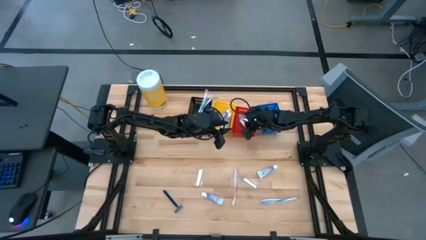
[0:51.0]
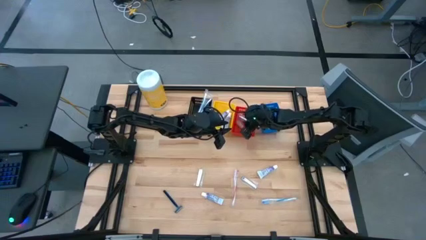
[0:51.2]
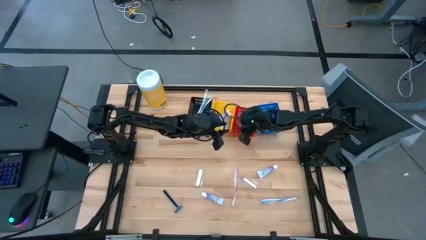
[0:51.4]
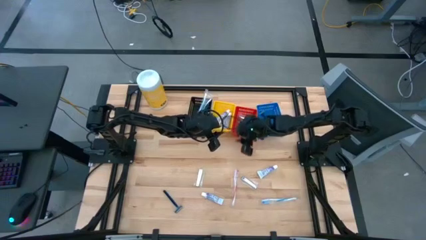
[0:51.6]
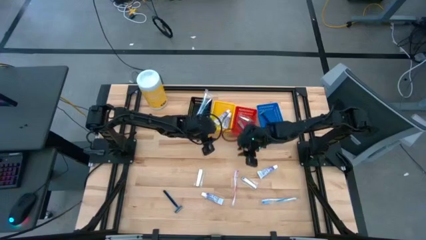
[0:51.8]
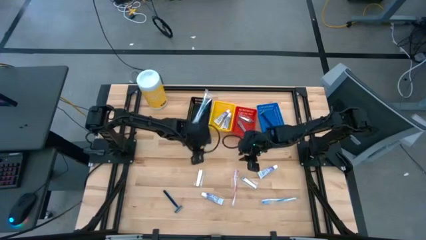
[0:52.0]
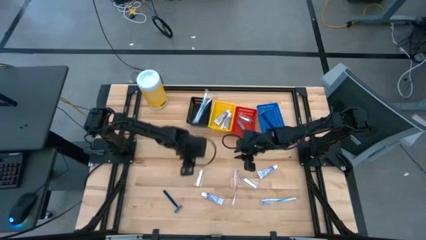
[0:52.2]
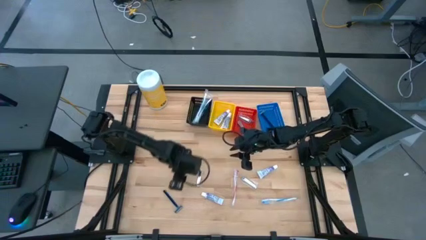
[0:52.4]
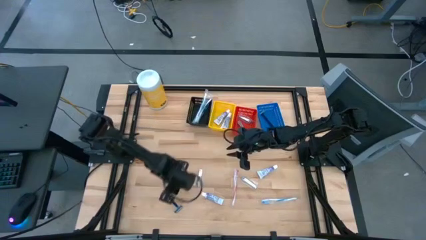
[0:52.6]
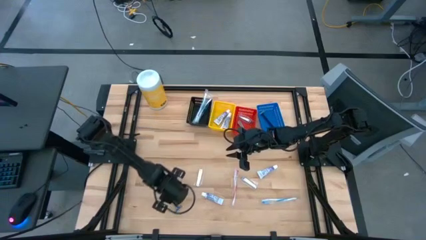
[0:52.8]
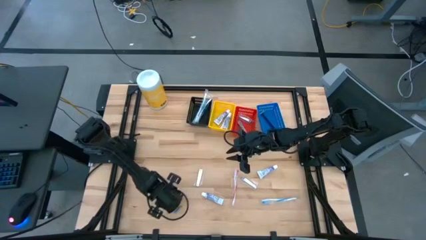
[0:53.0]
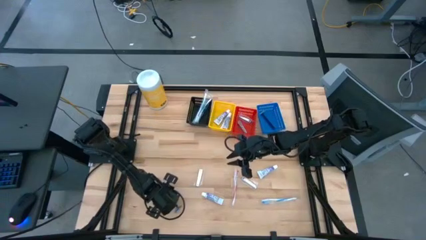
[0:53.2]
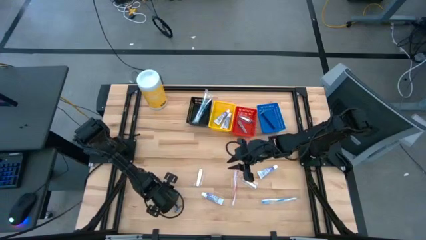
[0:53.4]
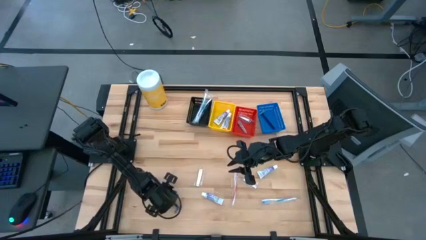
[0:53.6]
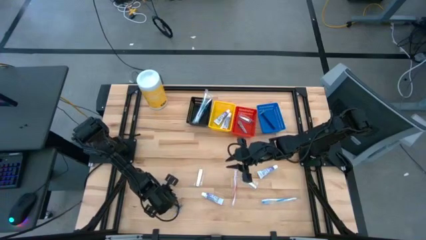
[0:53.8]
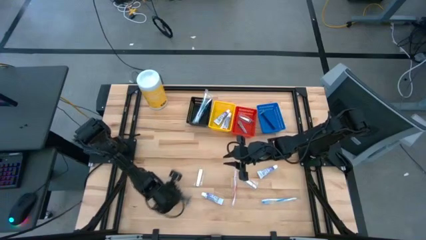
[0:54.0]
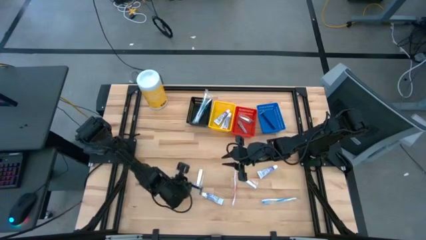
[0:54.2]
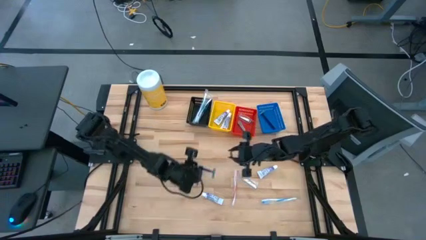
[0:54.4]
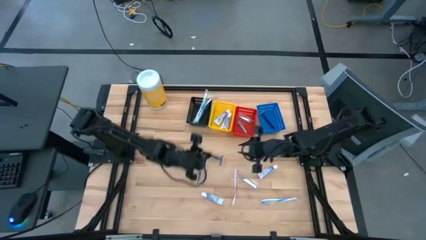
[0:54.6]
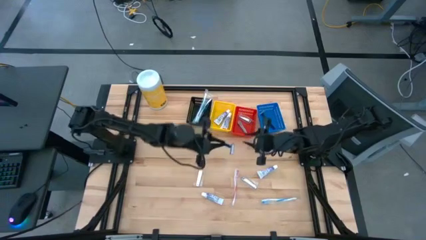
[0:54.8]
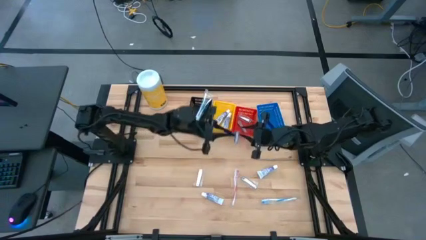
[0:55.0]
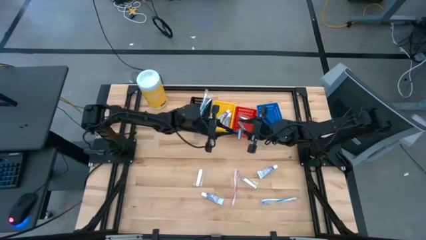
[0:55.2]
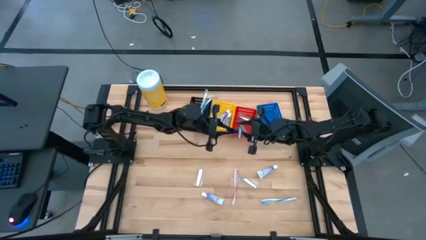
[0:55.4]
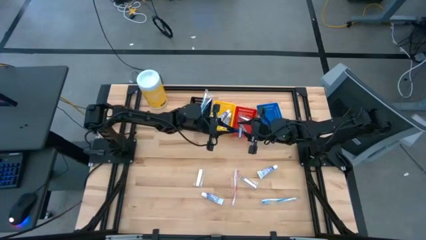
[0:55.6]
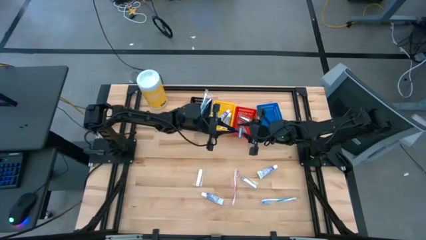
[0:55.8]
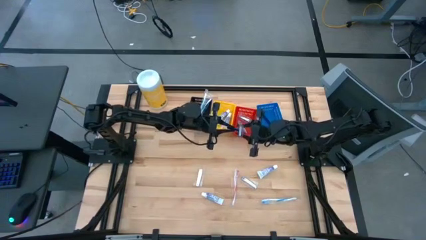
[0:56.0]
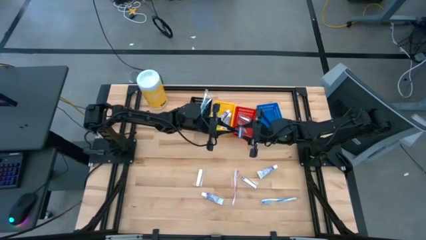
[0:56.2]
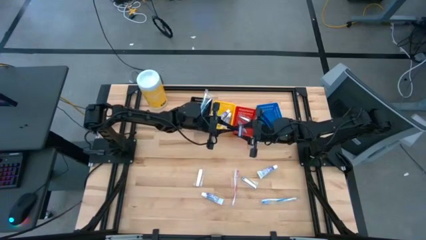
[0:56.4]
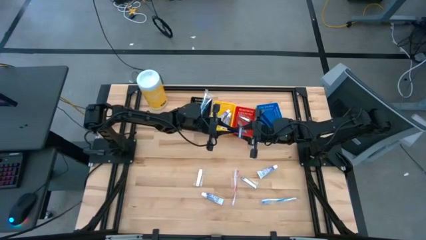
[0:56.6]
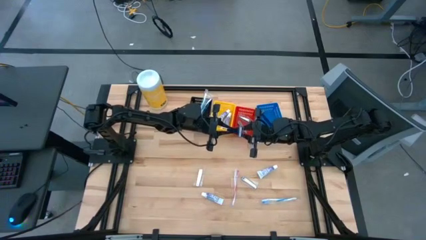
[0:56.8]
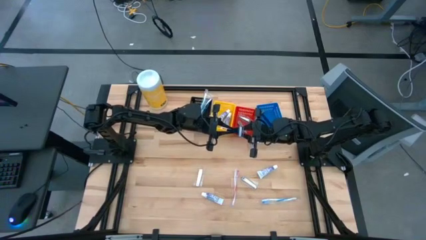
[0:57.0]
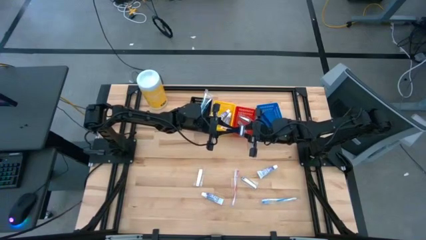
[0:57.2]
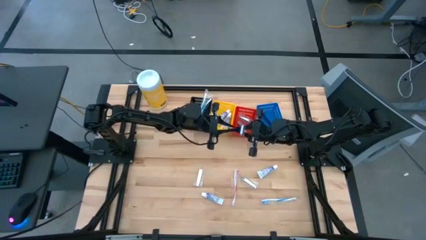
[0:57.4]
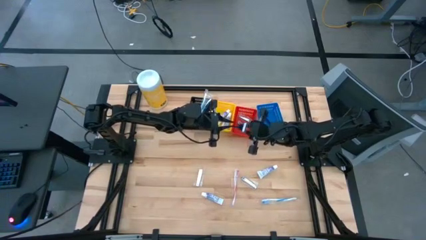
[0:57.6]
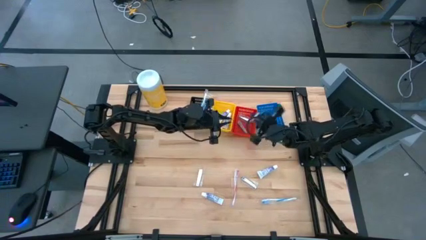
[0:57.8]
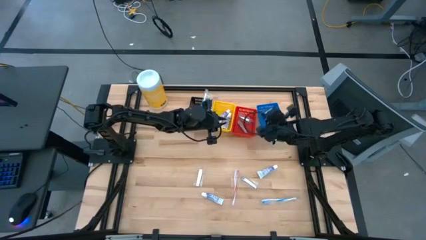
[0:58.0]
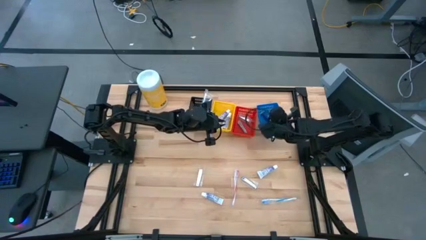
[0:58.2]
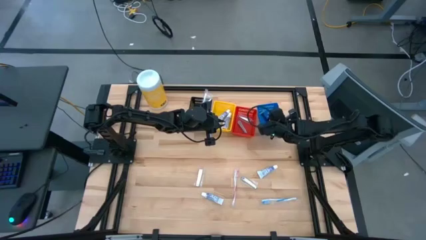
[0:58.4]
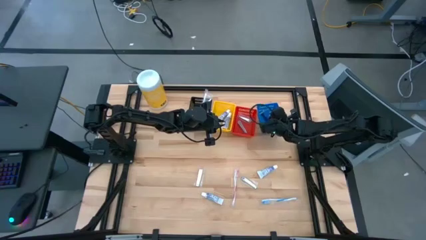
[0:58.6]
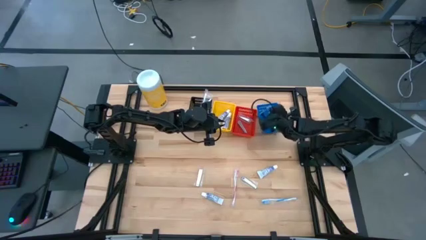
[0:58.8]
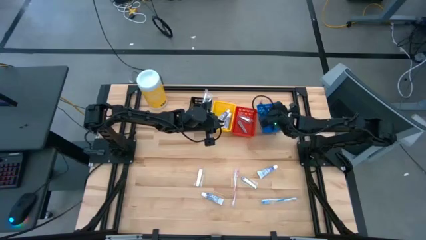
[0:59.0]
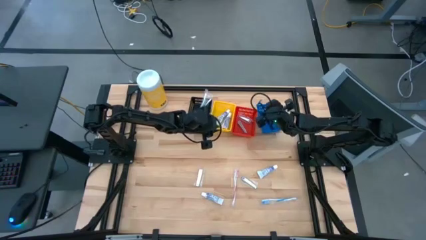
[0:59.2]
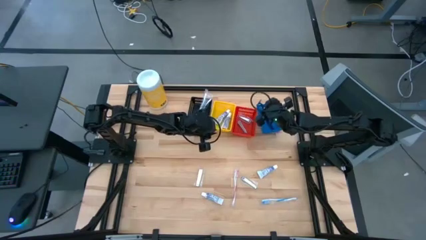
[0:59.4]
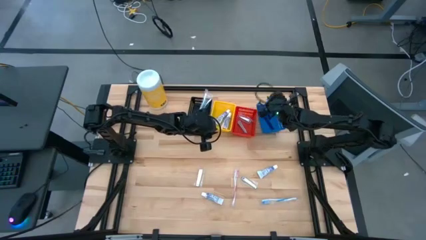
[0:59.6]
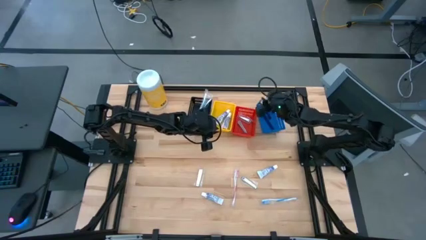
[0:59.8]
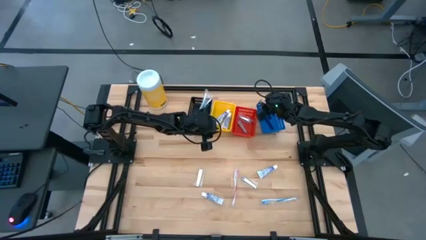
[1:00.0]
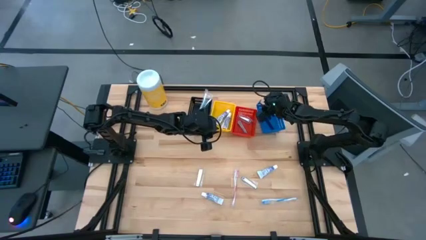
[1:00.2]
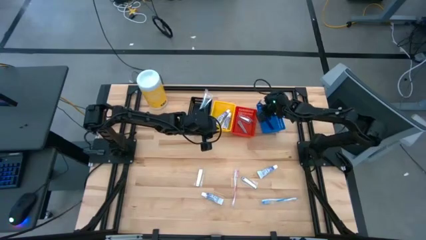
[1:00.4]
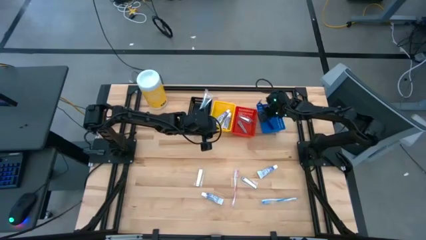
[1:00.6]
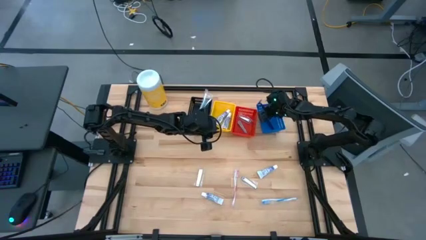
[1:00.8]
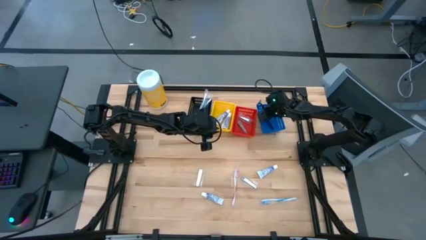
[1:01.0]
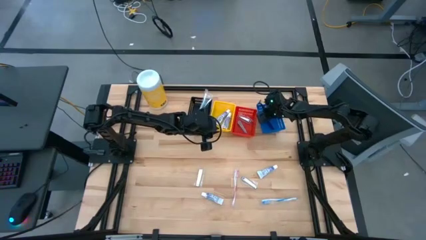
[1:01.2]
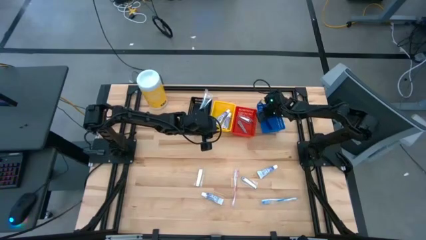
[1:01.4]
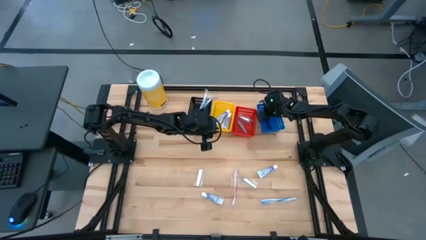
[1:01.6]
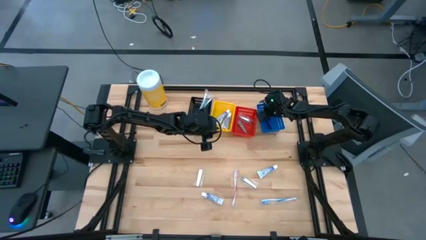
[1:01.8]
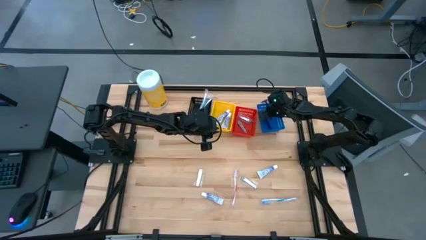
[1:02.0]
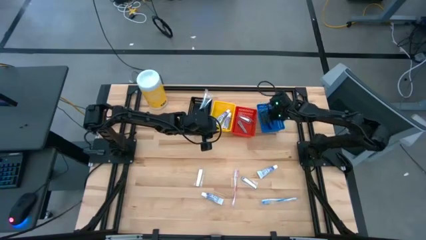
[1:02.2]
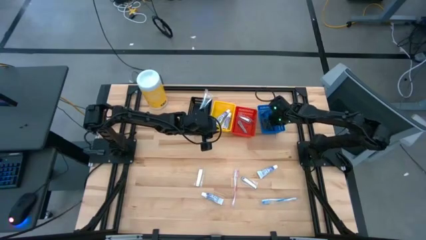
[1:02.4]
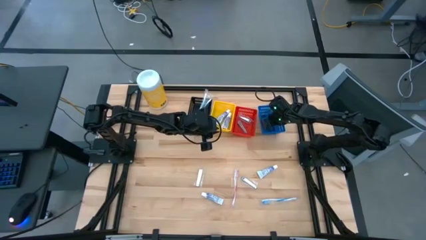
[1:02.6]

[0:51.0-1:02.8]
Task: Pick & Place Travel size toiletries
Put the blue razor into the blue bin
